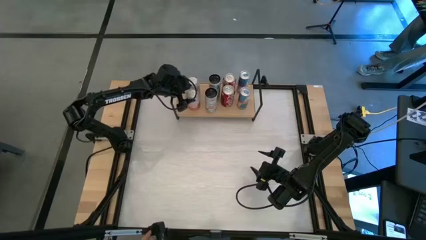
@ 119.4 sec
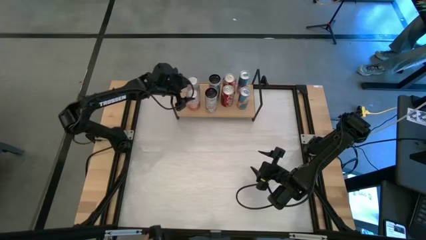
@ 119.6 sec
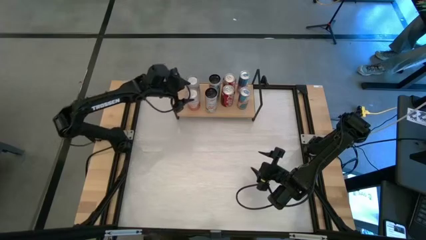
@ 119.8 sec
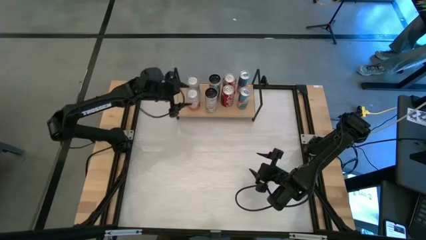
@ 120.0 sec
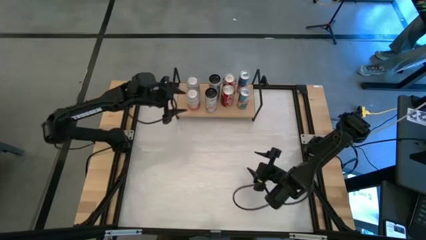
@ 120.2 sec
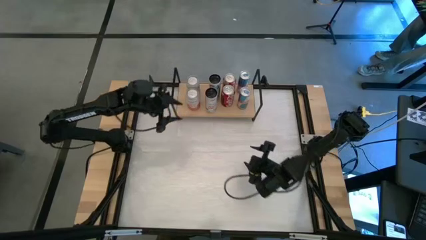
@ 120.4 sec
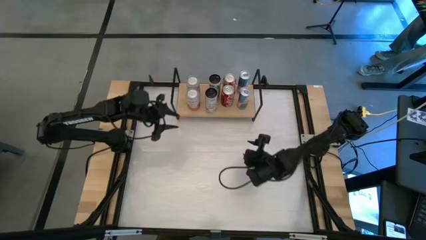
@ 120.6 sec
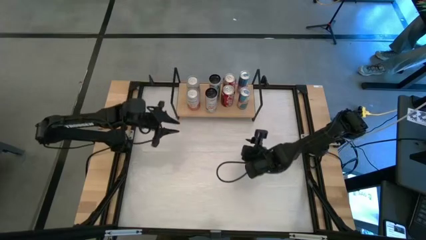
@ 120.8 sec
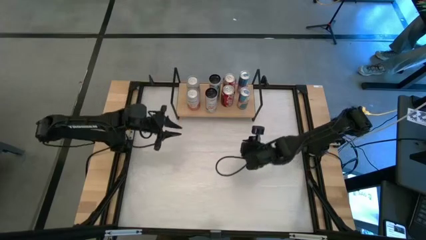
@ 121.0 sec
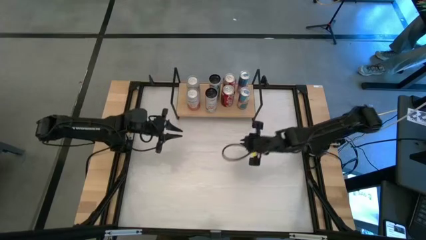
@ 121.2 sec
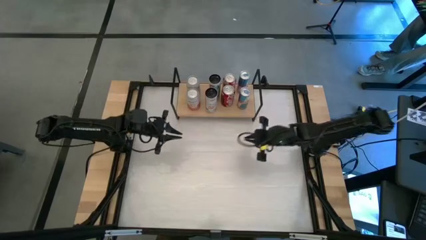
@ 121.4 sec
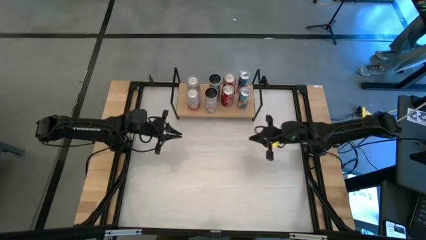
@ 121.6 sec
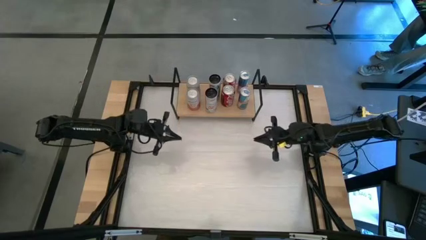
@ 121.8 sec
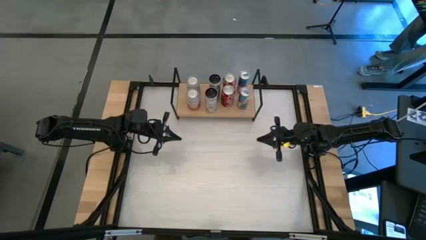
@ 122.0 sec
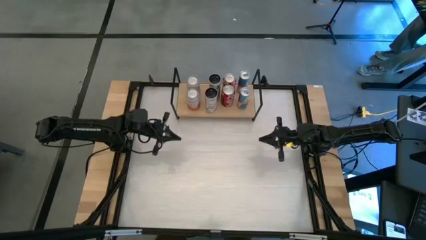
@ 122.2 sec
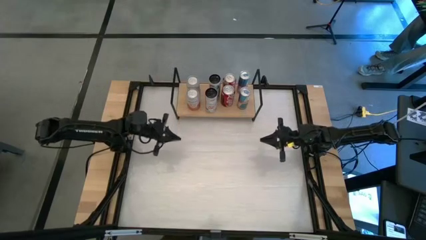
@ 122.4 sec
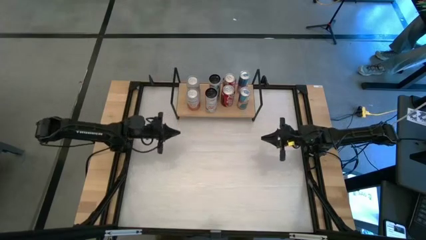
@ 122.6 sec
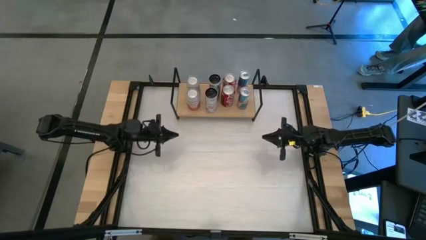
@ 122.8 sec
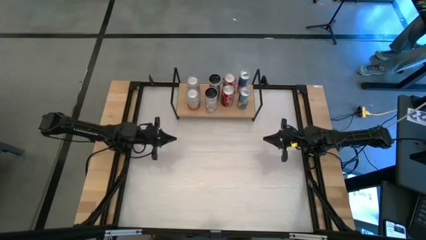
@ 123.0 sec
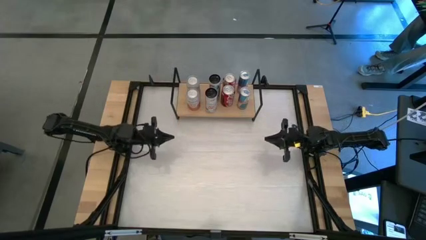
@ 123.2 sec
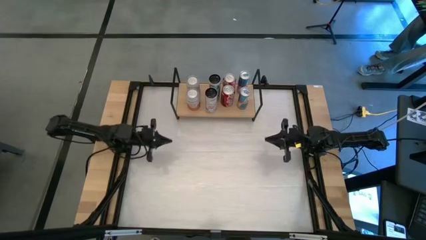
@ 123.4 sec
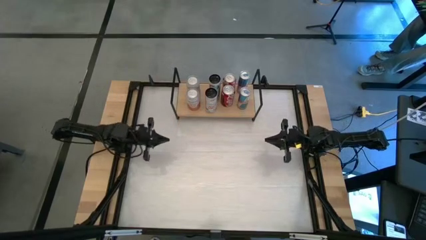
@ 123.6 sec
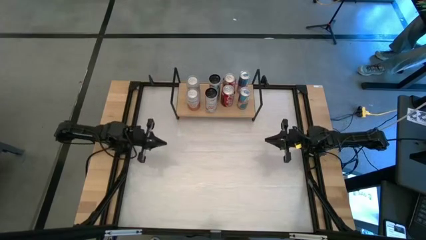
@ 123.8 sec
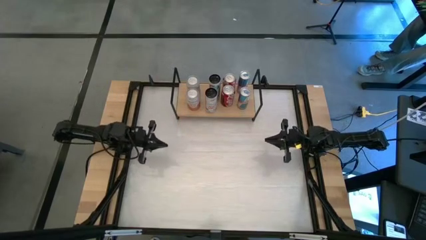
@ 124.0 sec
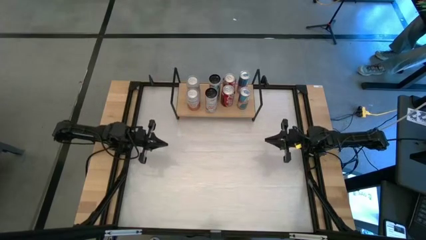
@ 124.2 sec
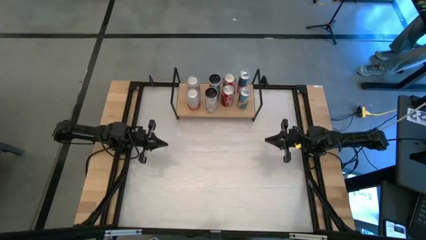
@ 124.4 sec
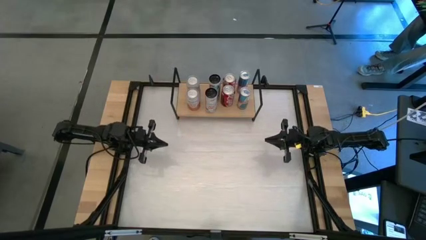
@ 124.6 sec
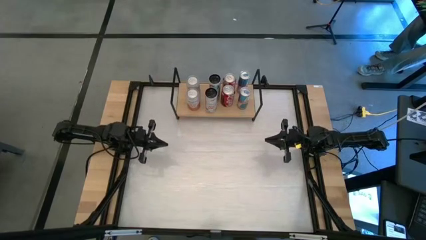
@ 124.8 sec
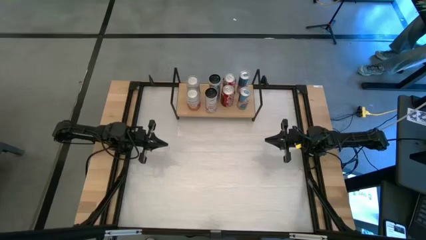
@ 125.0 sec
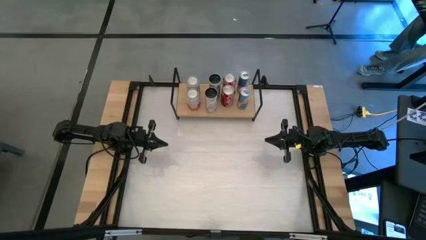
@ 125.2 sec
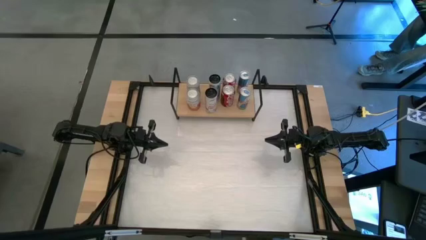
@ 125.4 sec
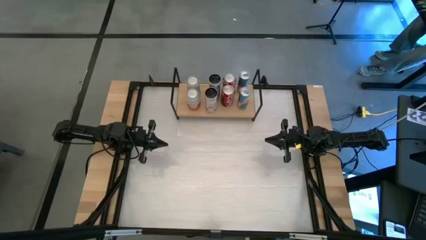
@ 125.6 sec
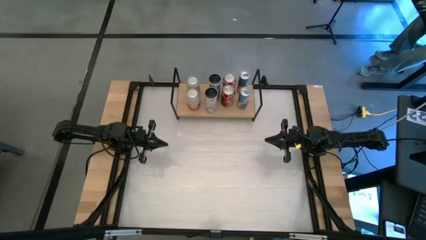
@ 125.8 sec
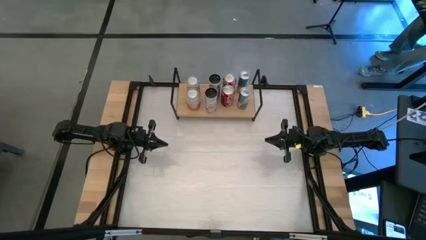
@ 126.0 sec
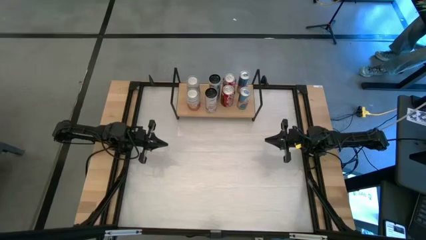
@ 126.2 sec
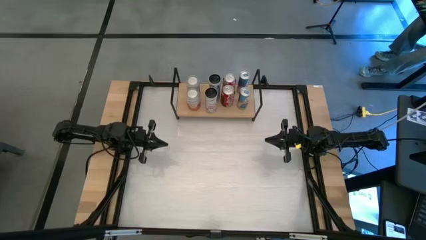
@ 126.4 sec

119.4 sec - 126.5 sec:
Task: Place canned beverage on shelf
Return to Home Position

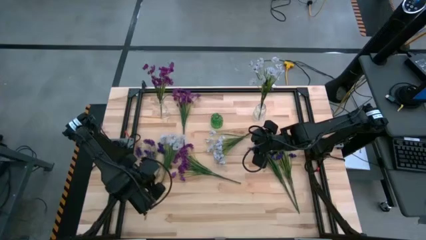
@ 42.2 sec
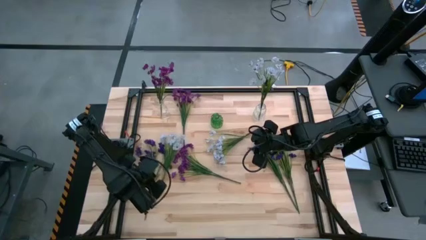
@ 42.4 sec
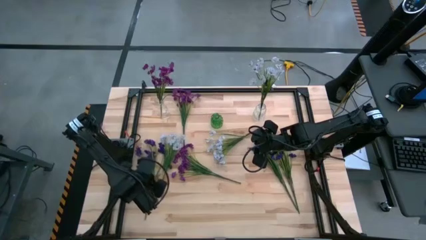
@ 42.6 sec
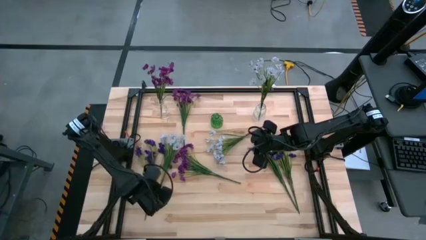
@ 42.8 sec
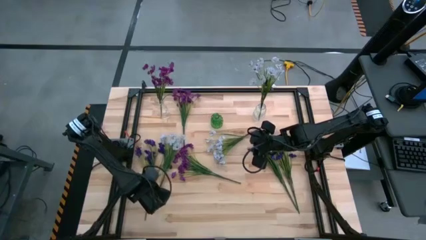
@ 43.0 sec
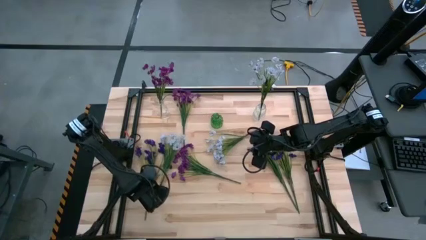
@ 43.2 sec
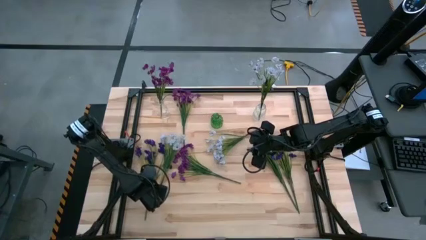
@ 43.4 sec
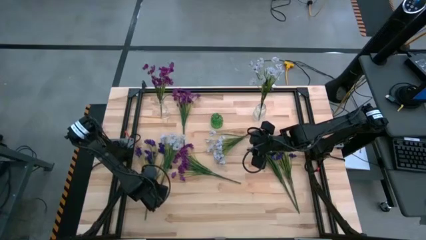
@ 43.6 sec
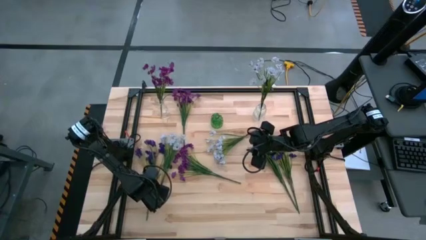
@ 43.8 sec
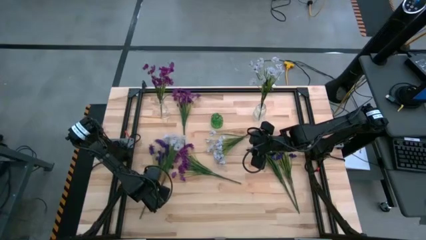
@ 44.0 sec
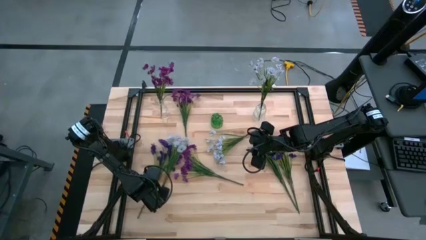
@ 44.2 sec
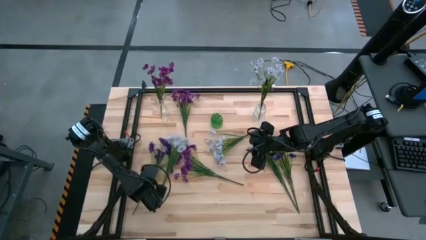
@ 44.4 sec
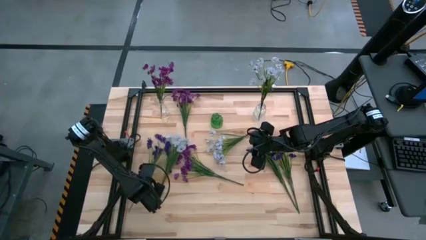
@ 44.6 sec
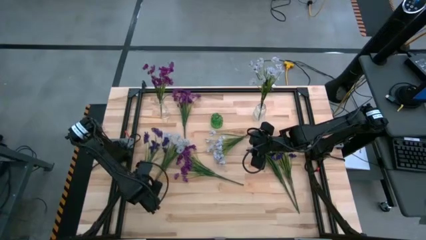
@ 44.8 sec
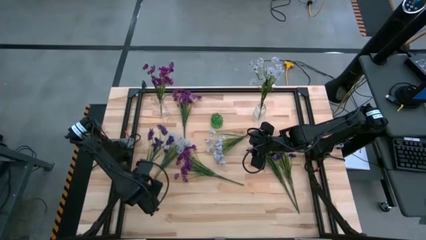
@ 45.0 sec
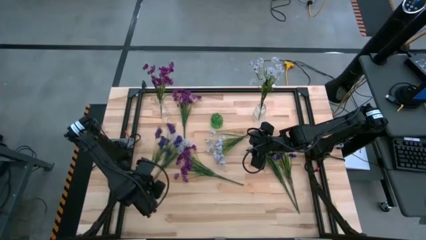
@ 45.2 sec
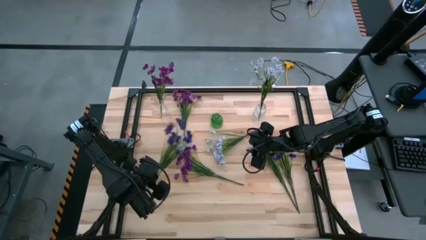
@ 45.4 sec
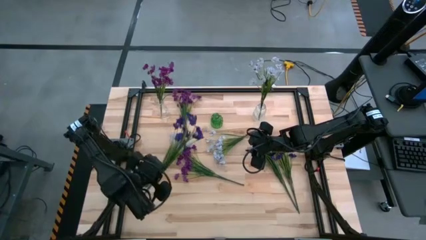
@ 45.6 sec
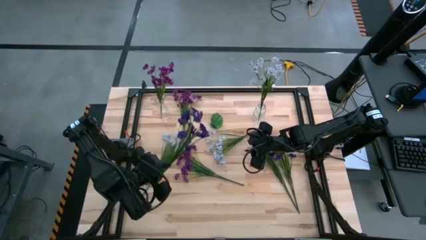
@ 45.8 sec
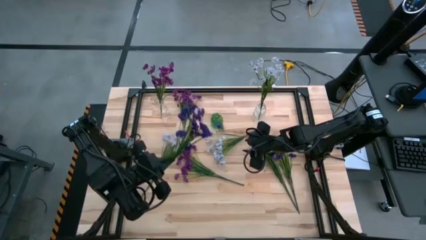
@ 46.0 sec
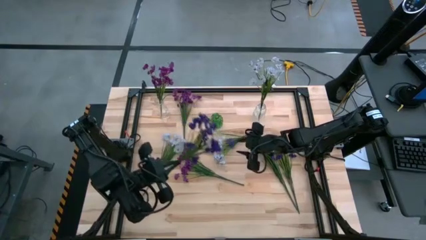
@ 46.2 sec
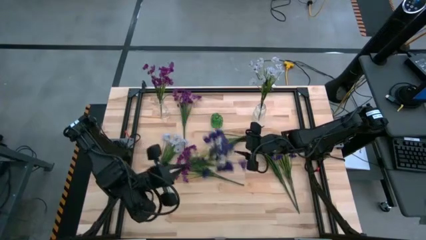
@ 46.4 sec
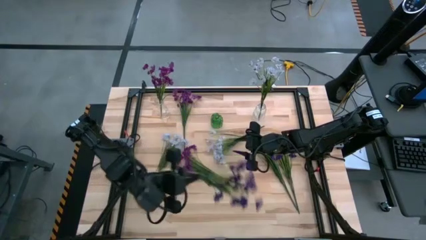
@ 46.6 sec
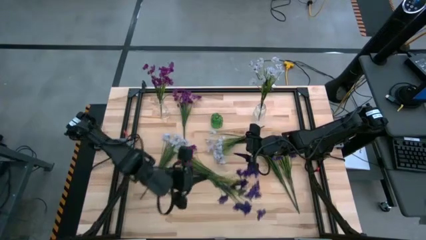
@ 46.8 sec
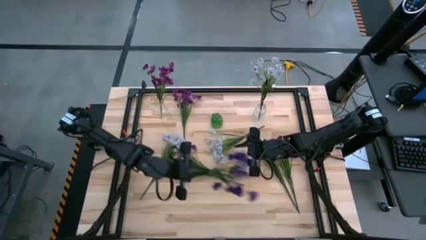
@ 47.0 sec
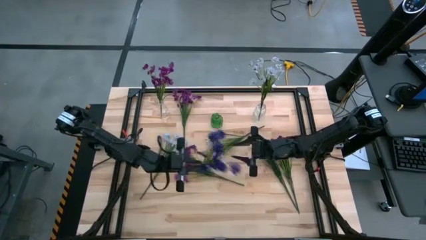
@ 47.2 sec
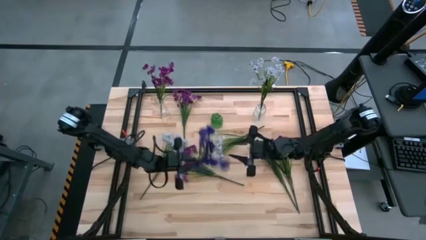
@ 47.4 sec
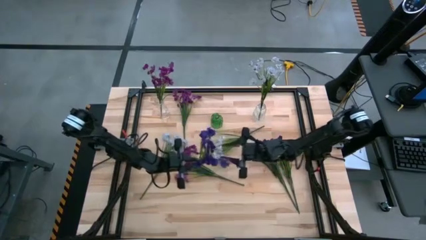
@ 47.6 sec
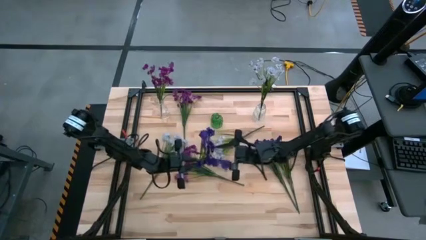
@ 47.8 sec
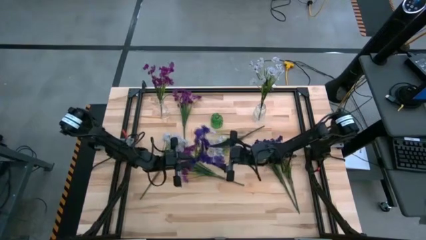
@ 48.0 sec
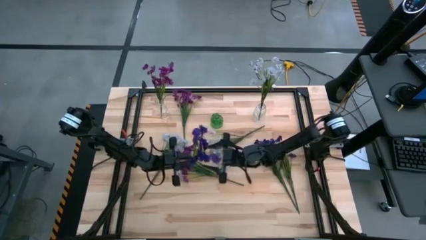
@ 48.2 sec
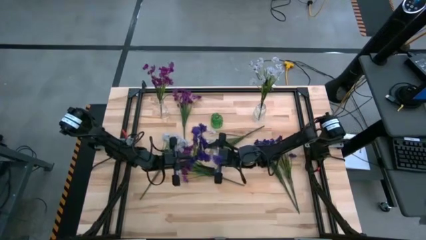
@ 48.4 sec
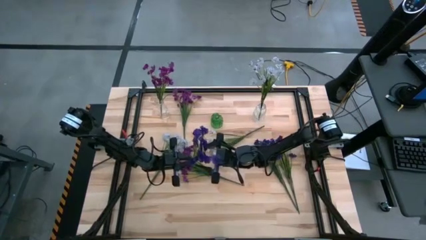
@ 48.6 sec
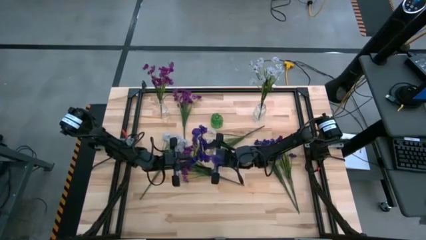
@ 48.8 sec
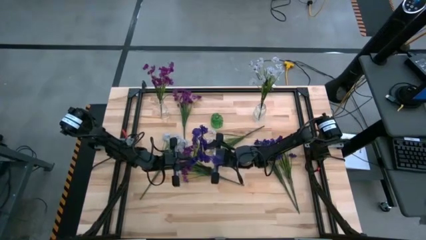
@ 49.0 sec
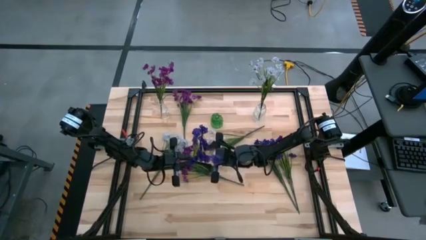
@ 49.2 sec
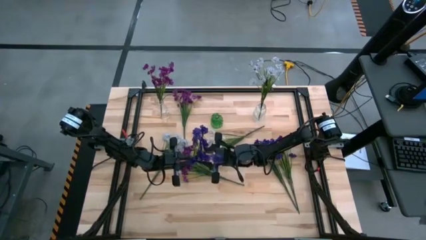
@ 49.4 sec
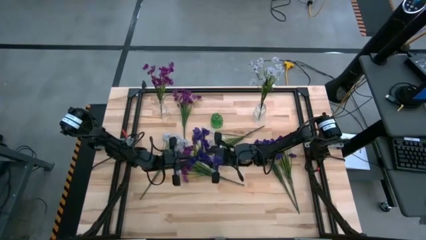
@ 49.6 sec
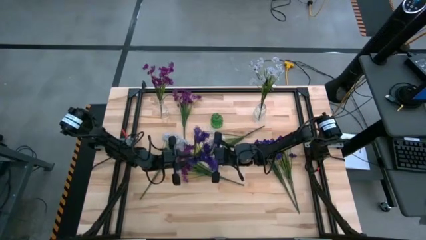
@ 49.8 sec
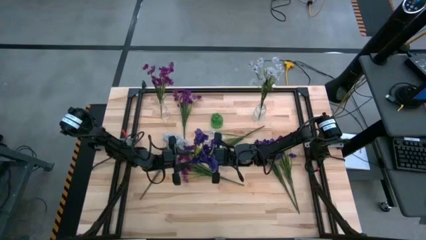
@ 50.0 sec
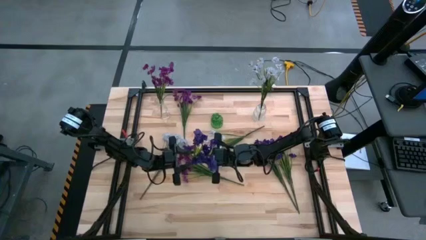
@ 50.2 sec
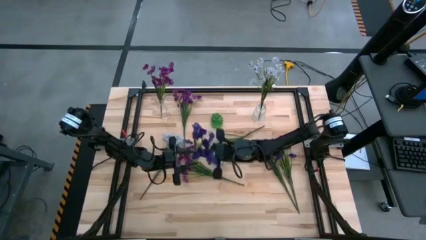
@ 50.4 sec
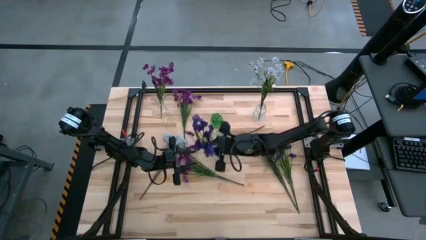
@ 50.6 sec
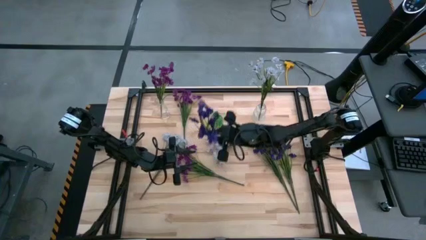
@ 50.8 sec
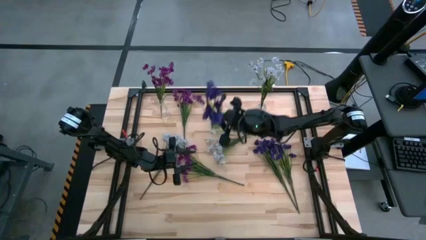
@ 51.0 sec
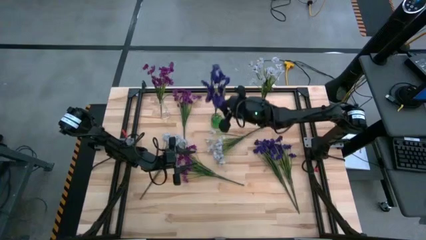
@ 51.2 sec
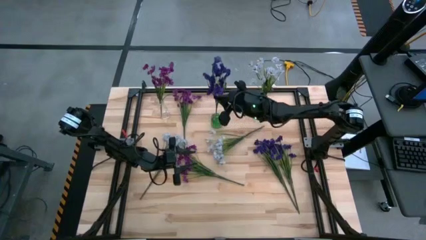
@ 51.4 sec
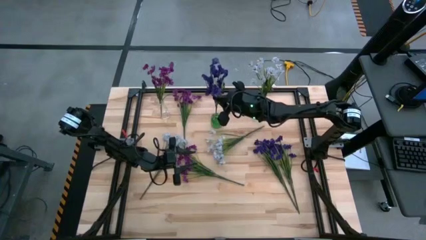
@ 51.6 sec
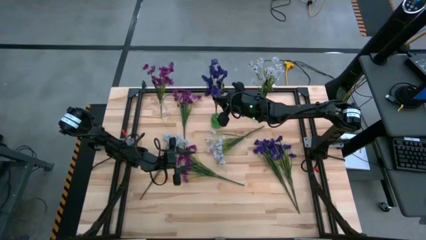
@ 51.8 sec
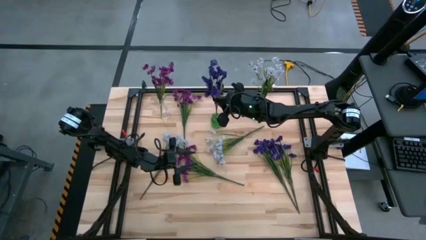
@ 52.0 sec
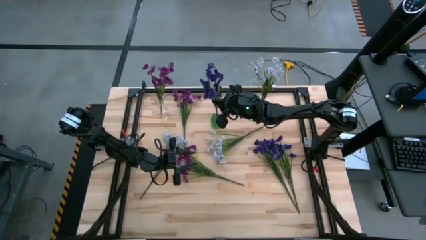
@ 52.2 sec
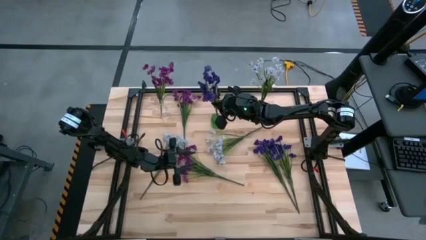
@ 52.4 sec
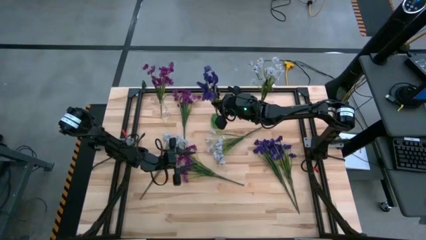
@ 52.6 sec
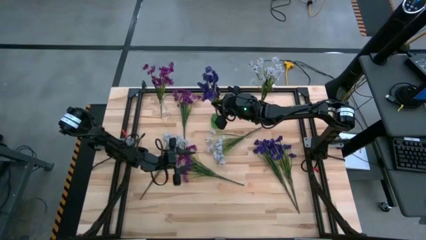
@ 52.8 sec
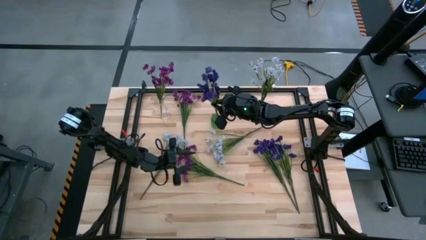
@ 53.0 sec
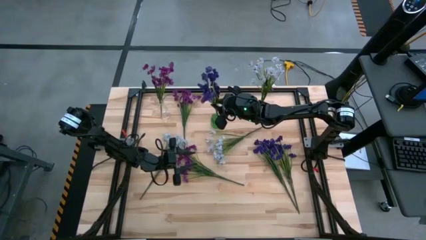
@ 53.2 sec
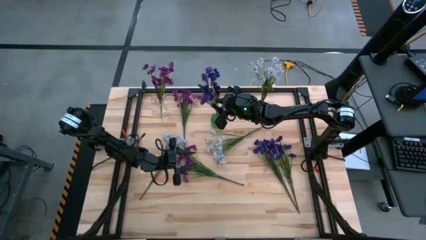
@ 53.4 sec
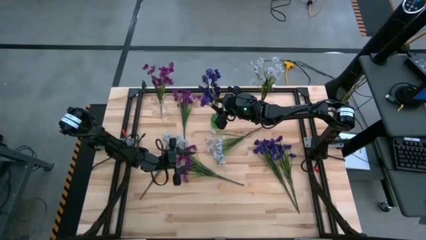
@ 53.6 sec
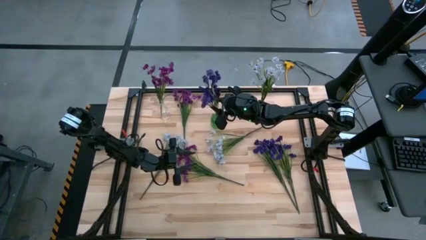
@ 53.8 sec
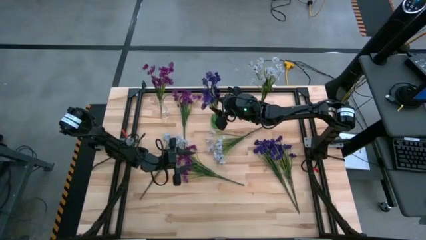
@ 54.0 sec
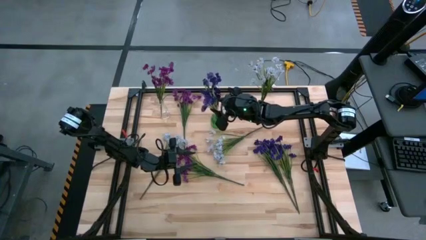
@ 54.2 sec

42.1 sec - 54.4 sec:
Task: Sort flowers into vase by color
Put the left blue flowers into the green flower vase
